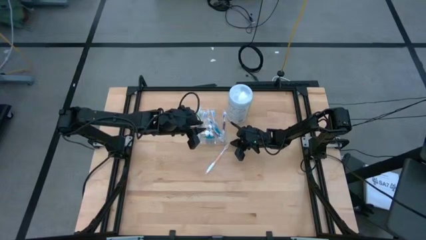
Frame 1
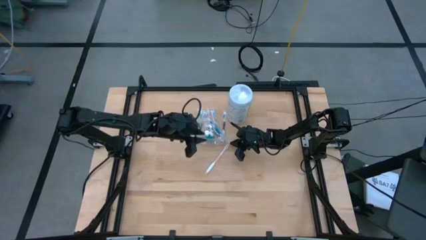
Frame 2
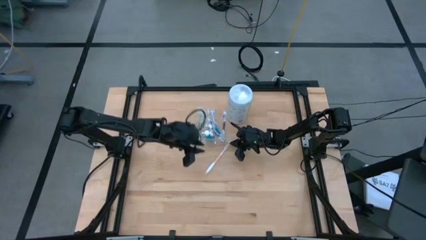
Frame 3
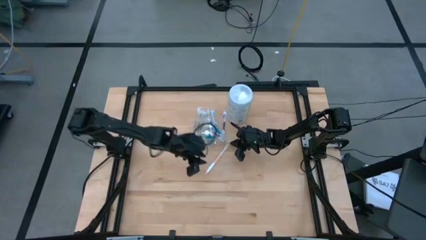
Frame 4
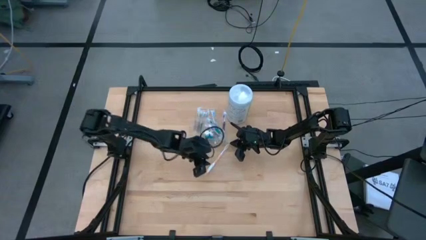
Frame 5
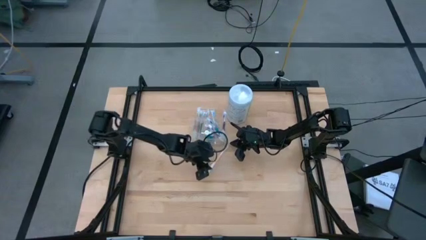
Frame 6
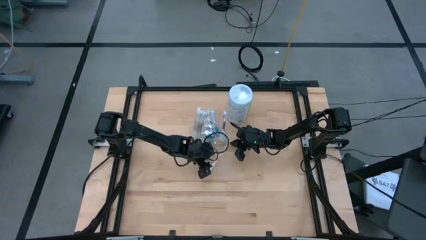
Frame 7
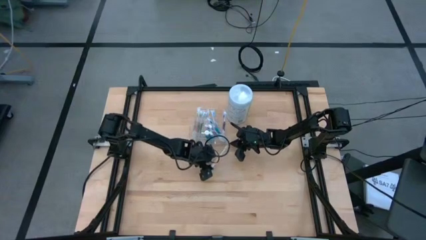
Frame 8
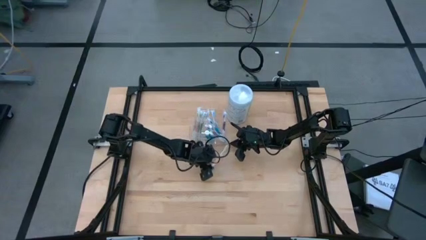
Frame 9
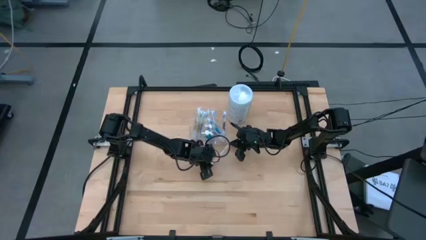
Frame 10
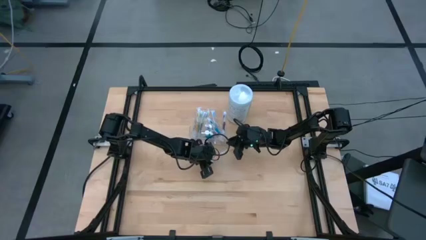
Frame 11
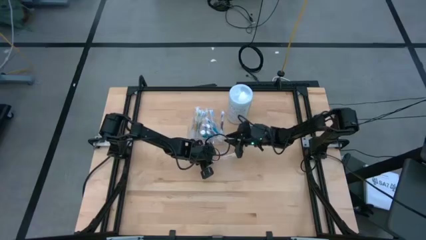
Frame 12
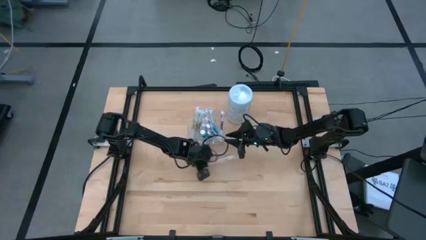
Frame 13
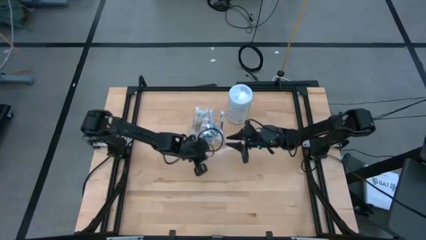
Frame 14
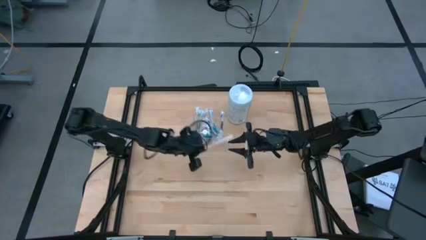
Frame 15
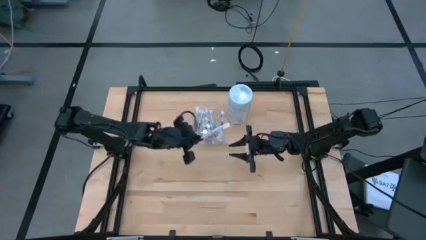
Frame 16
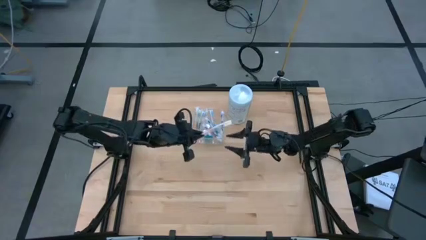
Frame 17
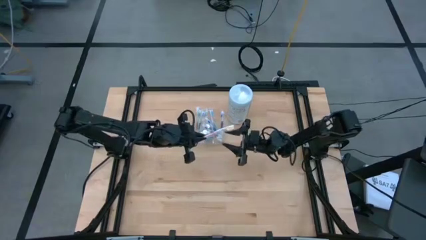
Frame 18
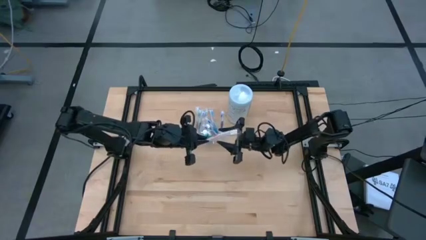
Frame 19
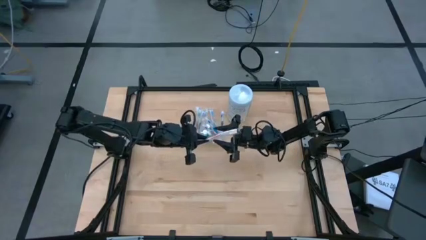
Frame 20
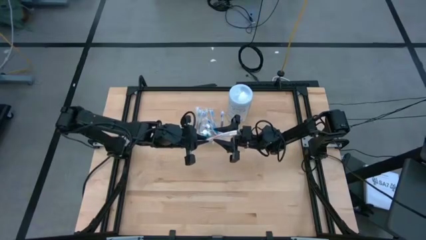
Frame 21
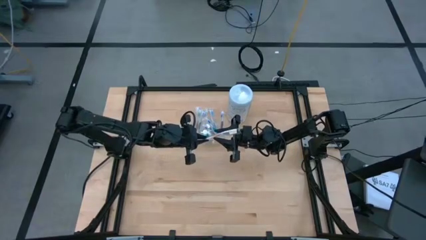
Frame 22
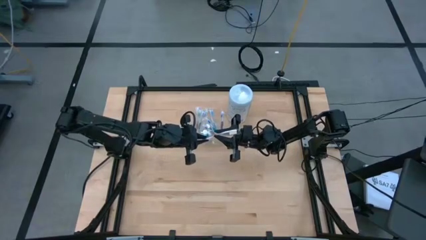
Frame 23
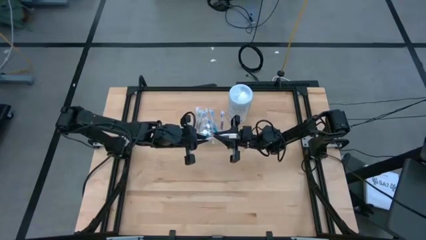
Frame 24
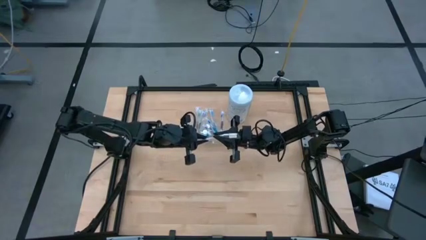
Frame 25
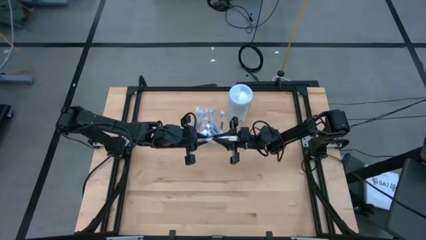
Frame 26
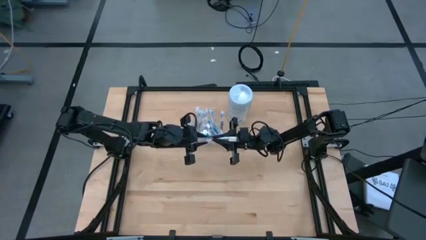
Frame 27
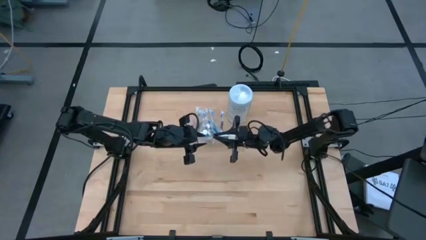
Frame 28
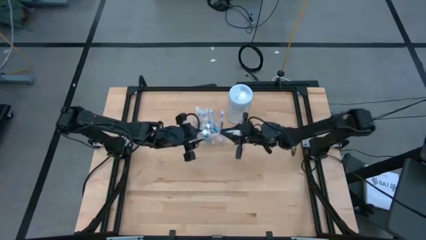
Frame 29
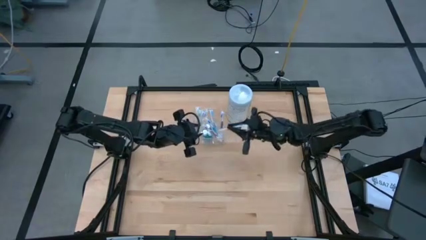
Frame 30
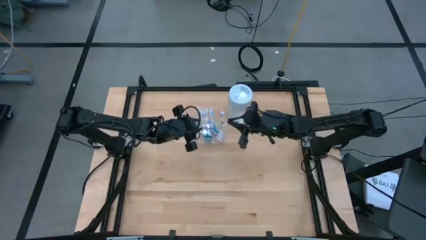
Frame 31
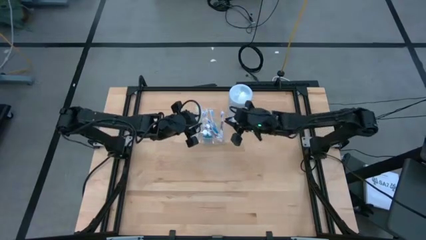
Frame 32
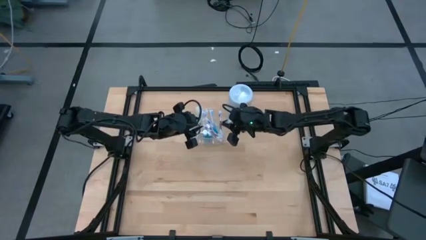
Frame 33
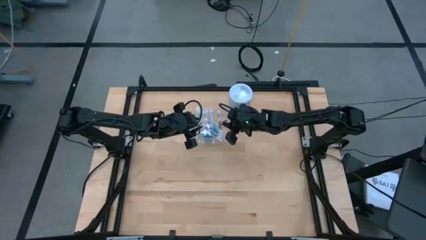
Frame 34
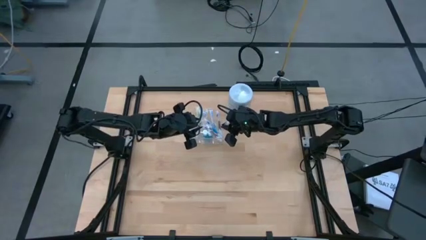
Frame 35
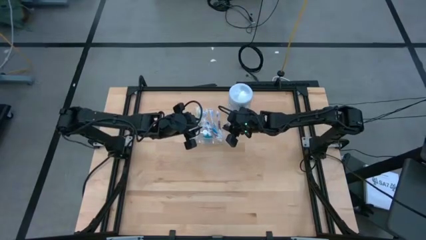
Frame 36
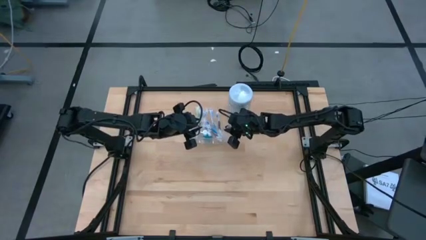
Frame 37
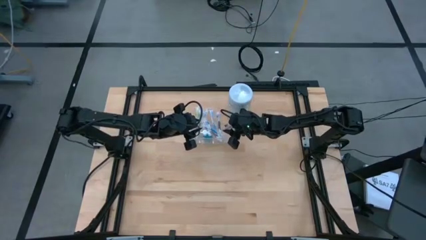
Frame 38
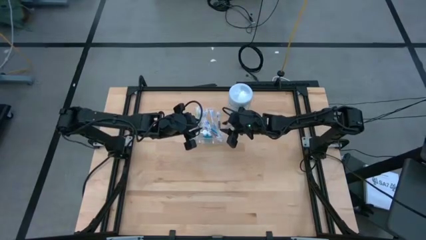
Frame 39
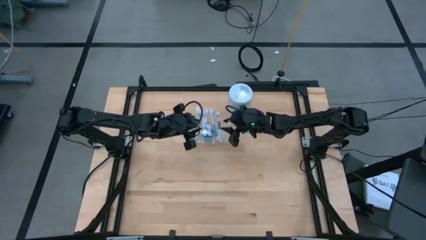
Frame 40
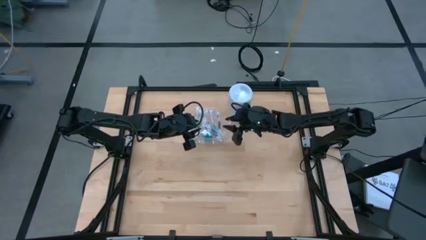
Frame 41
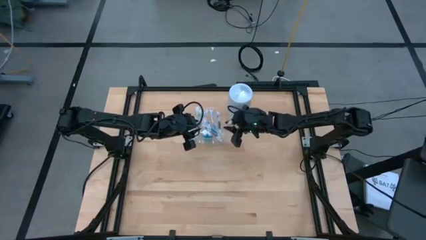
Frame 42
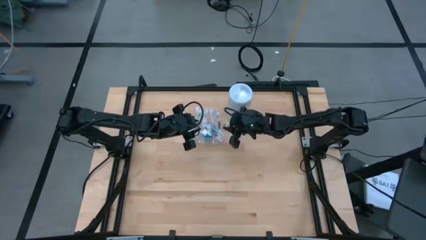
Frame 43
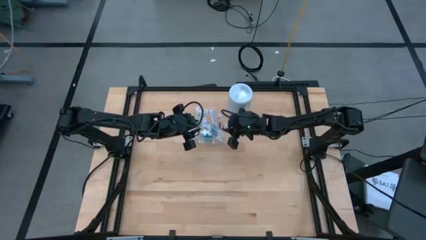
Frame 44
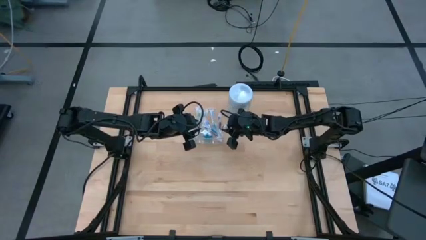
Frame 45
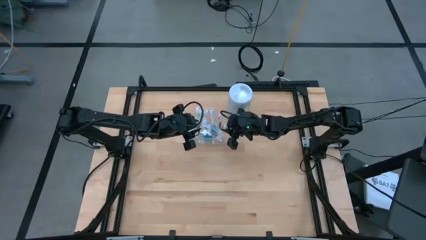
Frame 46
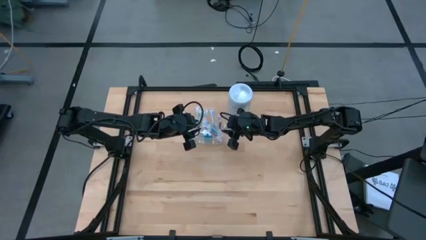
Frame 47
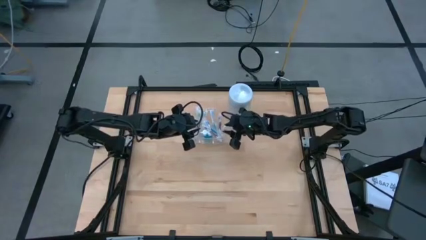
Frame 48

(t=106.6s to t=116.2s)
Task: Pick & Place toothbrushing station
Put the orange toothbrush into the transparent organizer

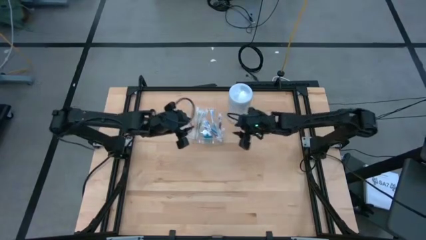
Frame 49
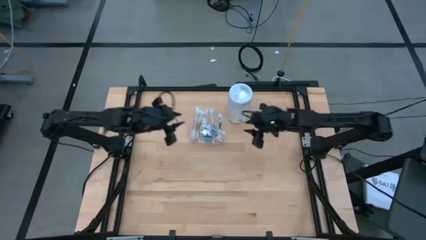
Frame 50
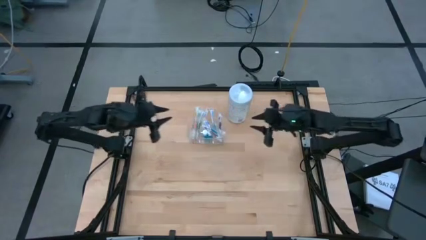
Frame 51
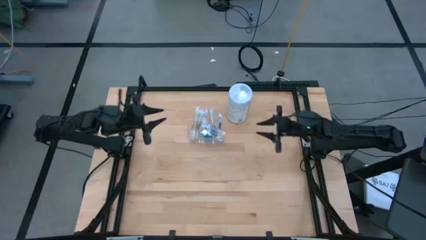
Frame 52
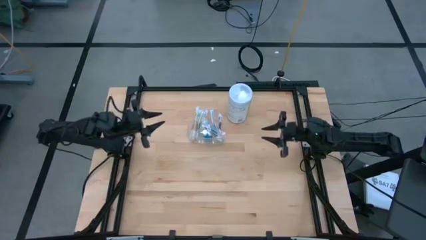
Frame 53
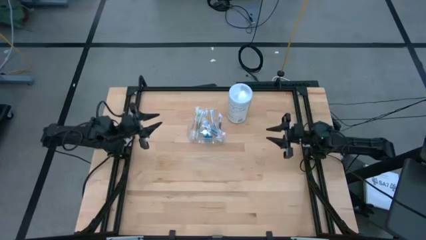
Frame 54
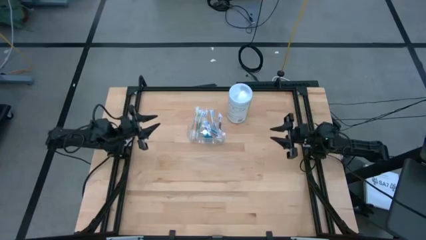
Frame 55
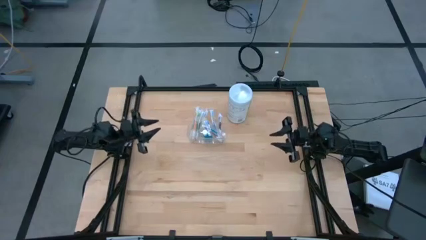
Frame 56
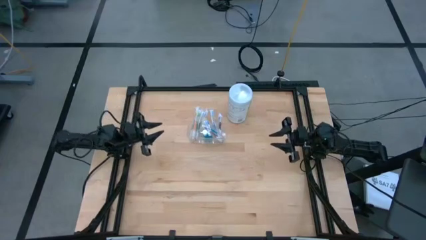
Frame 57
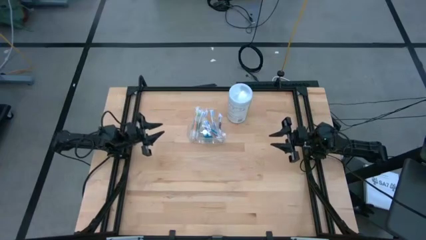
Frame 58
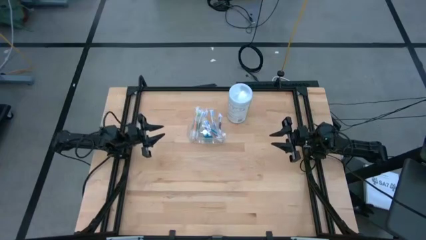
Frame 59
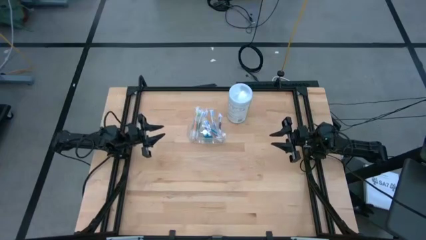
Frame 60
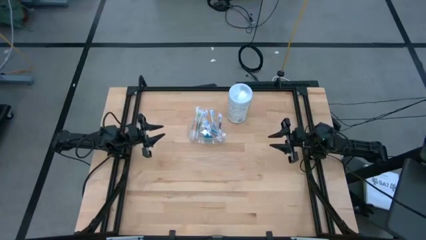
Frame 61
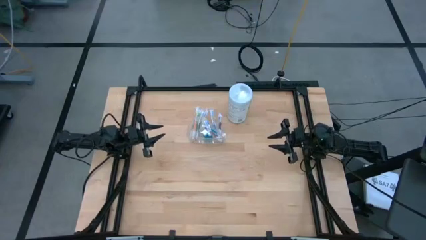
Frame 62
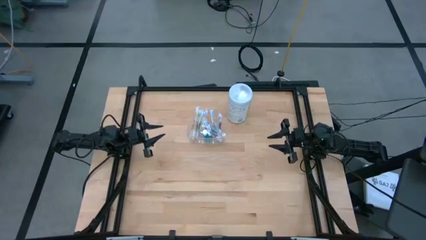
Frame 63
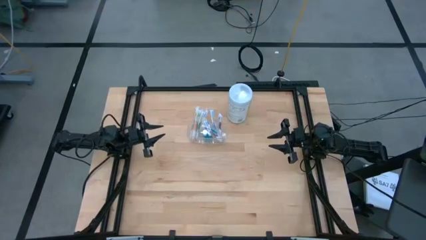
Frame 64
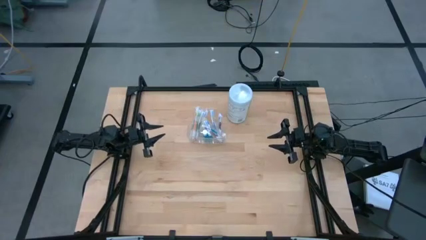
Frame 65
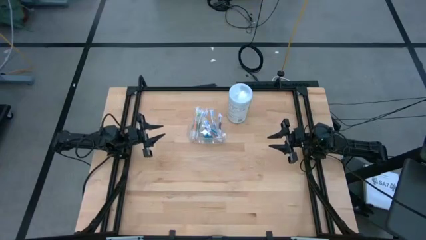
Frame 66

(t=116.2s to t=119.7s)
Return to Home Position

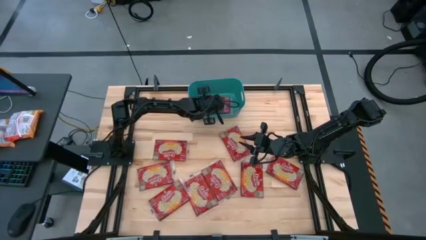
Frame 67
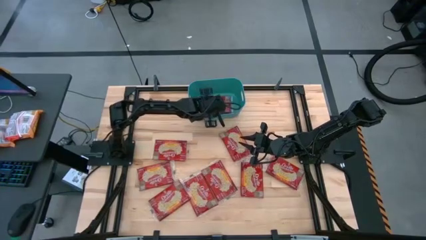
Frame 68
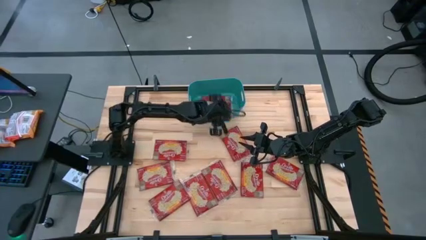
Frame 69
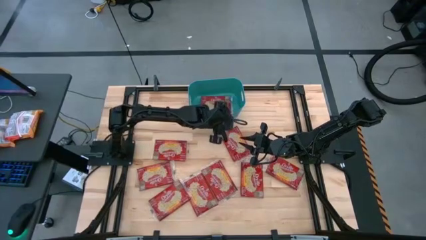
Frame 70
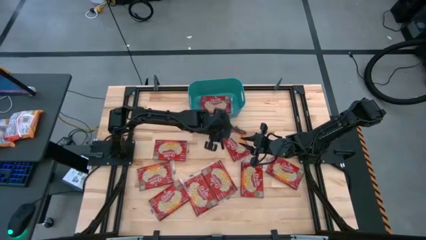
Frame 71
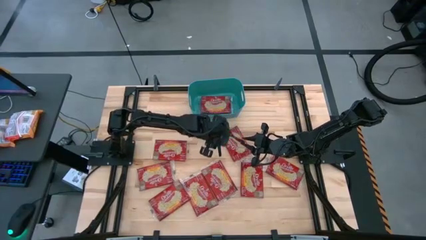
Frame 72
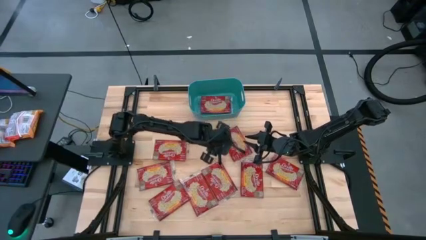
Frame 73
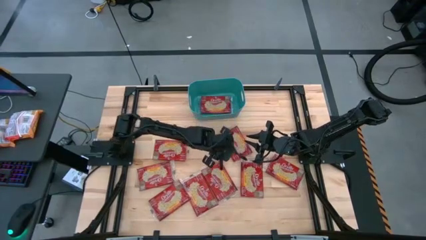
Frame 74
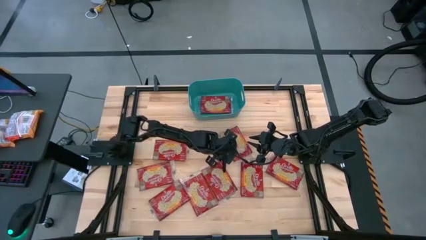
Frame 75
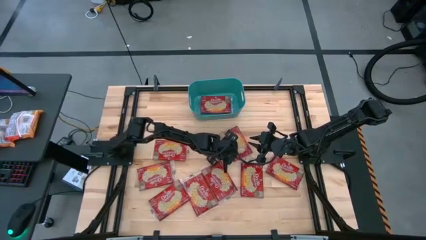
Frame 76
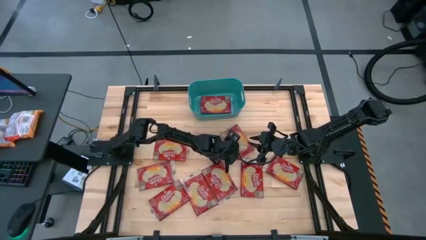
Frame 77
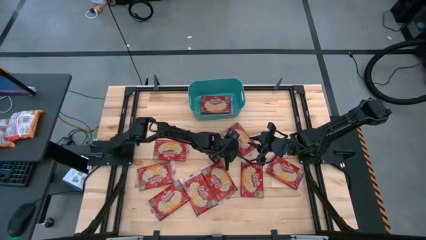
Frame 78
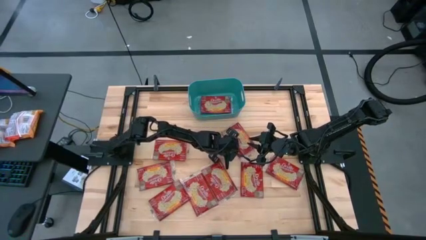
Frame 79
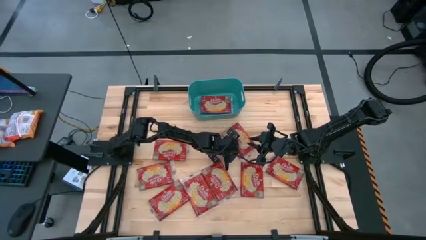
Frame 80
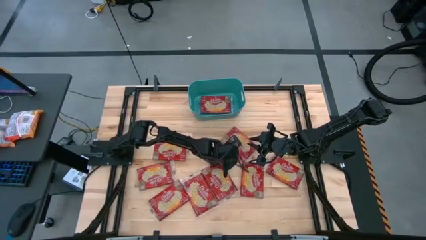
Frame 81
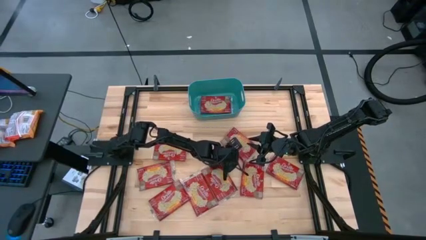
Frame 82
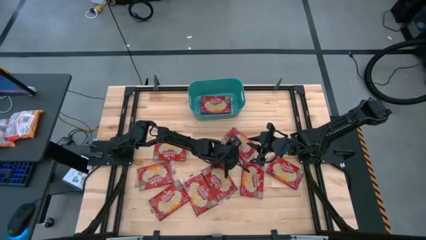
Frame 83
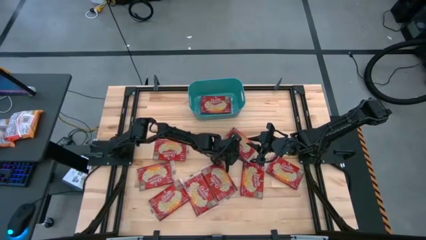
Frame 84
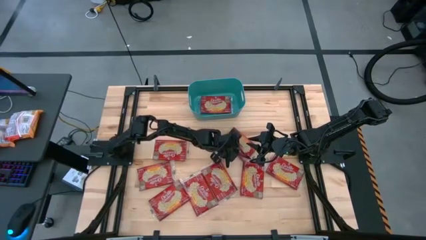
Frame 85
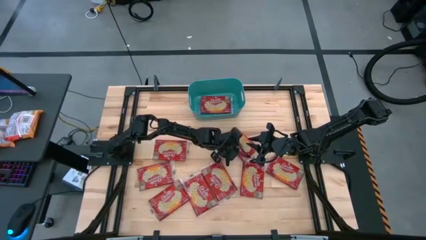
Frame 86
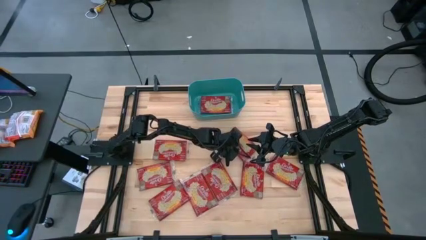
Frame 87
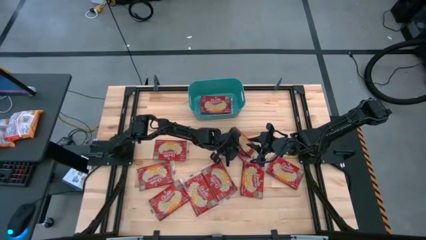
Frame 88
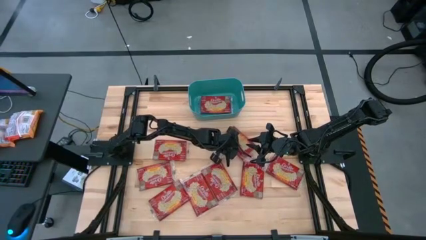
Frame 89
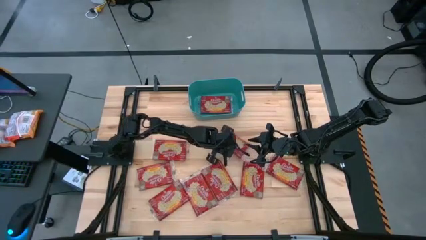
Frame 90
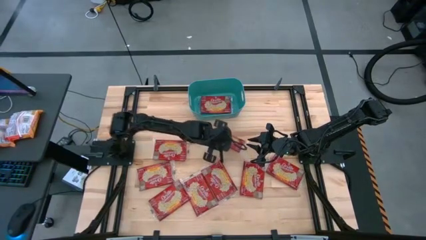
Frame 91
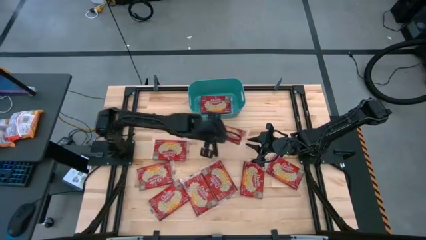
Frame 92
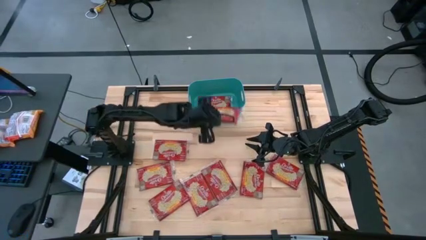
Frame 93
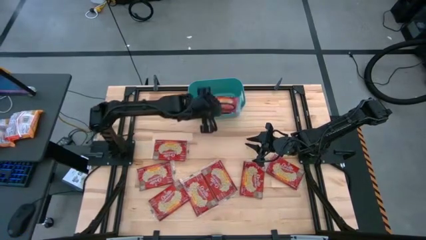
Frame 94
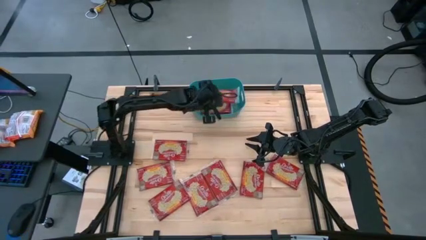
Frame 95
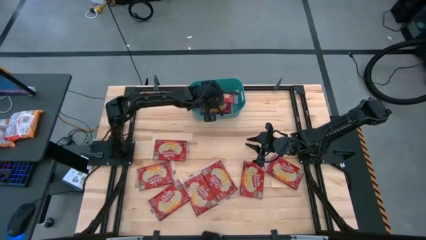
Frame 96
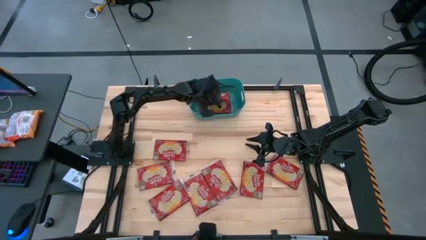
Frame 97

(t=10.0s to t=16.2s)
Task: Sort popcorn bags into baskets
Put the red popcorn bag into the bin
